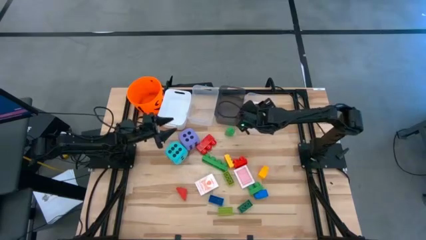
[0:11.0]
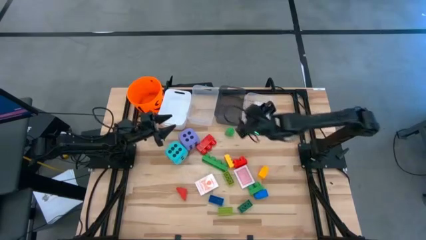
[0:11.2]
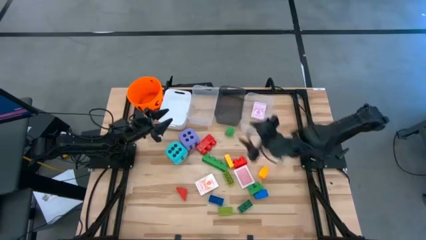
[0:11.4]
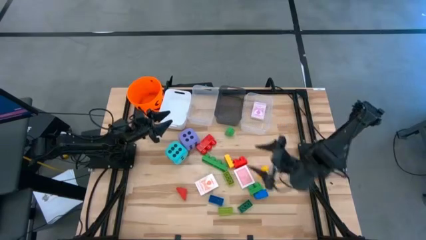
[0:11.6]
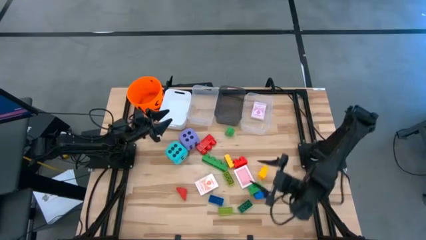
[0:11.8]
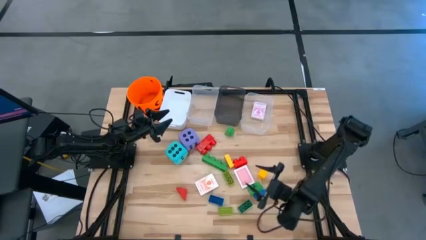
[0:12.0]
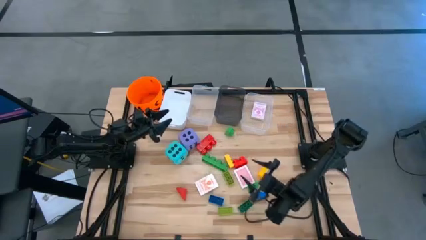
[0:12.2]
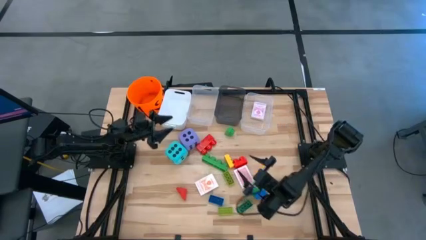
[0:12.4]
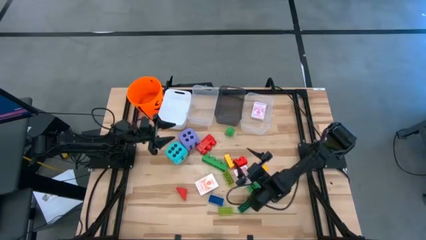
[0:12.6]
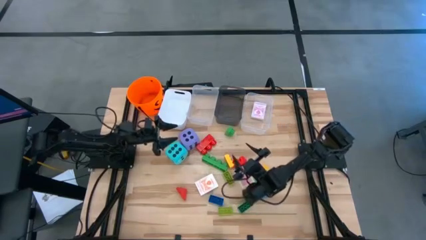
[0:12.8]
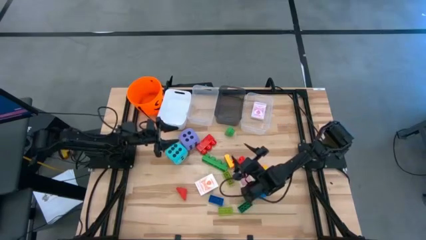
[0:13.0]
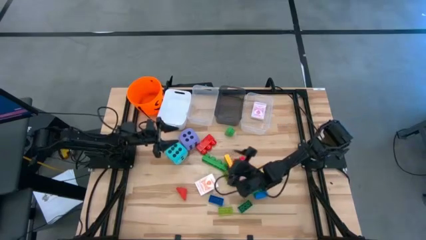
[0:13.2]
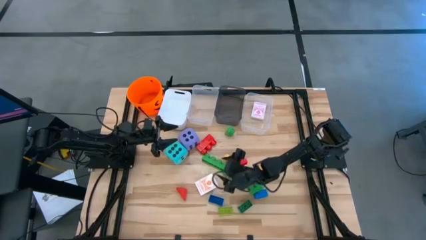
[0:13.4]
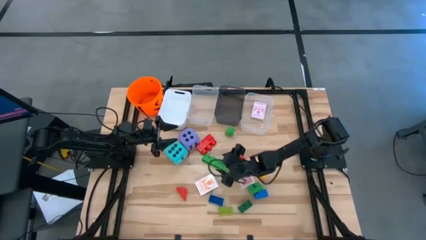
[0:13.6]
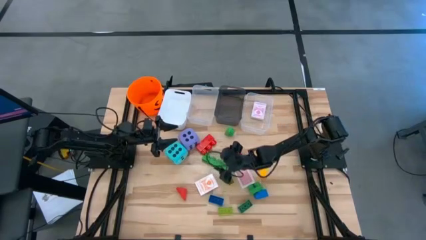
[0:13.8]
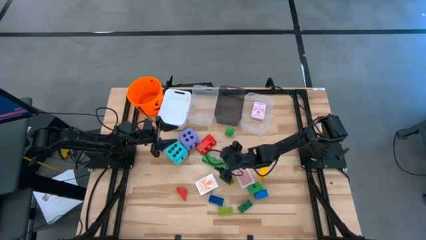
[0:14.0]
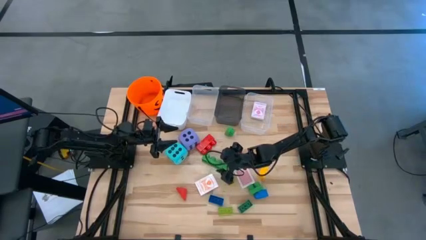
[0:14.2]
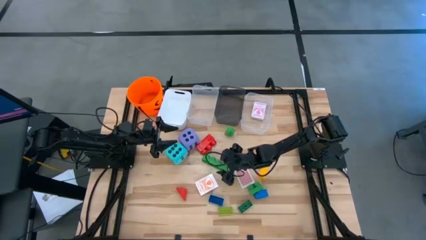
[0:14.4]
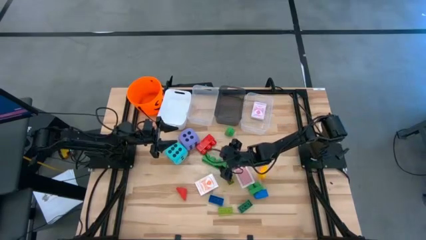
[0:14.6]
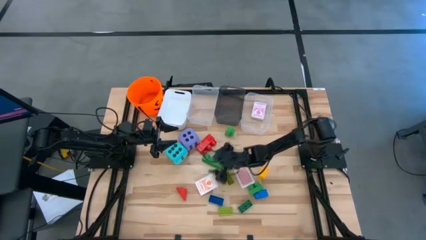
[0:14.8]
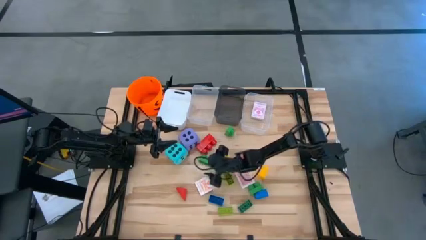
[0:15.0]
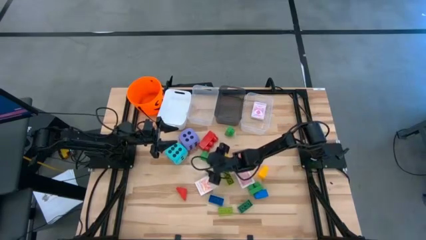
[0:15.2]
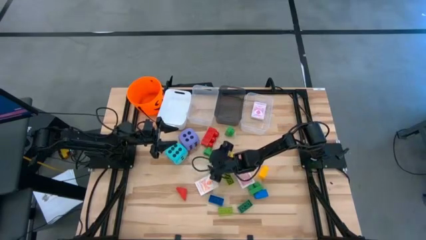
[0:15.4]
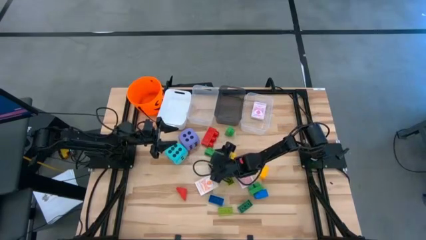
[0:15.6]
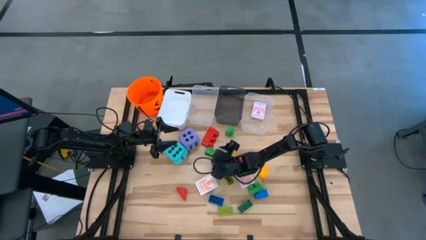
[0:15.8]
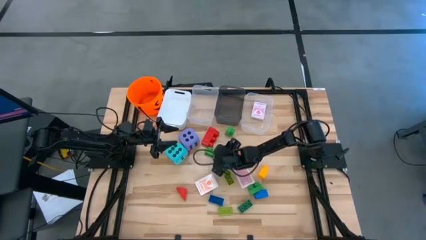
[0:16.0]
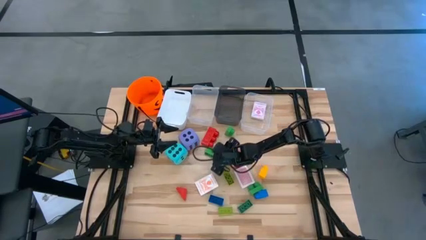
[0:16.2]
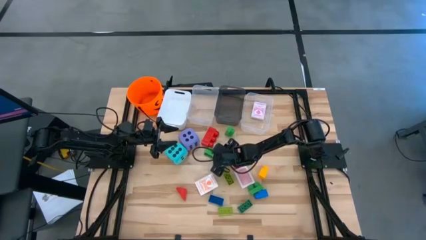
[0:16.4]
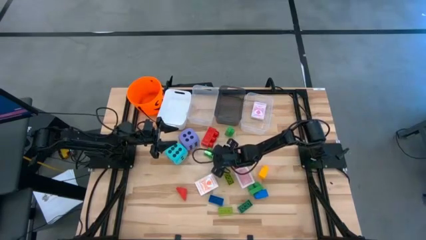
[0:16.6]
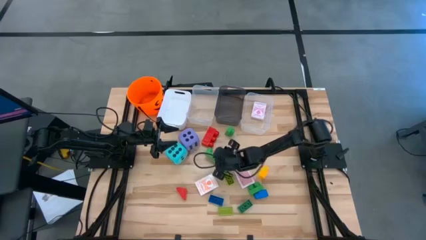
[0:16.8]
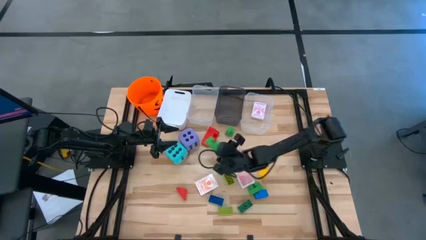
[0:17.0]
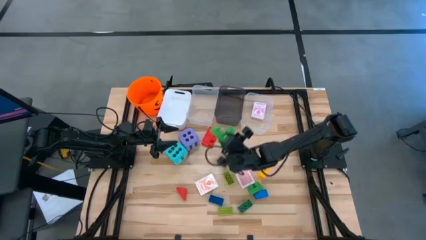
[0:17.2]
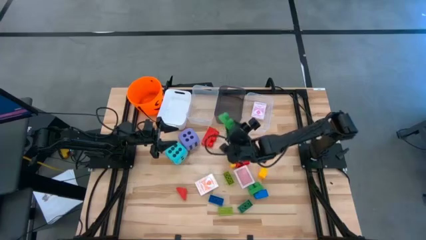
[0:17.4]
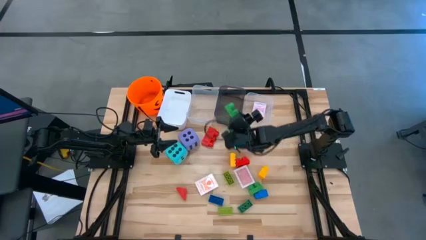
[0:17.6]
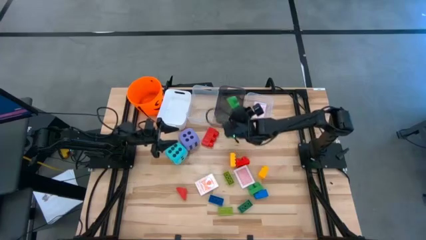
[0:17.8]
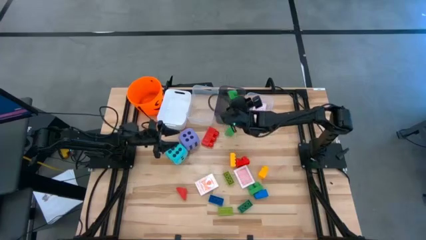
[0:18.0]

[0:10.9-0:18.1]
Task: Pick & Place Toys
Put the large middle green game piece into the black bin

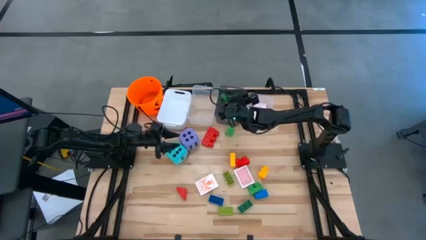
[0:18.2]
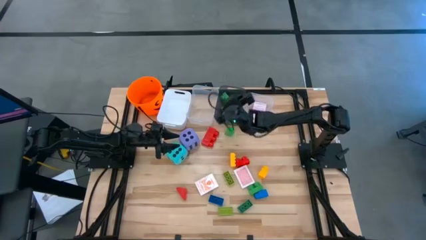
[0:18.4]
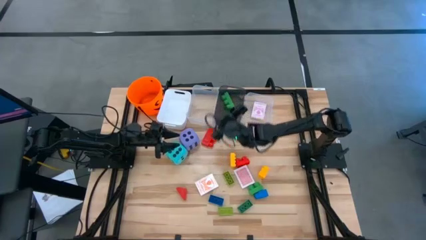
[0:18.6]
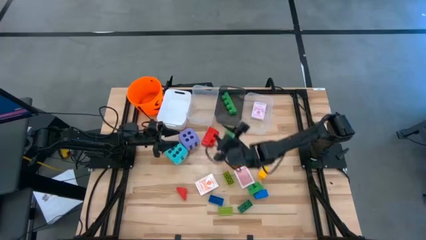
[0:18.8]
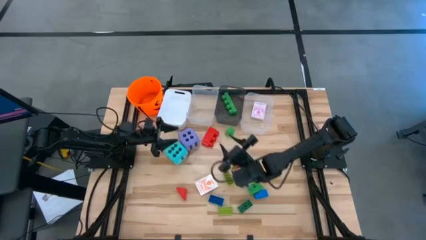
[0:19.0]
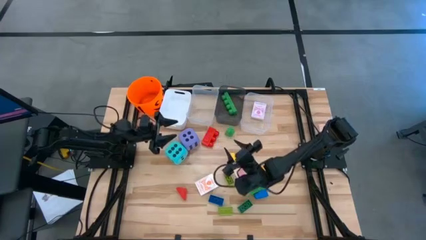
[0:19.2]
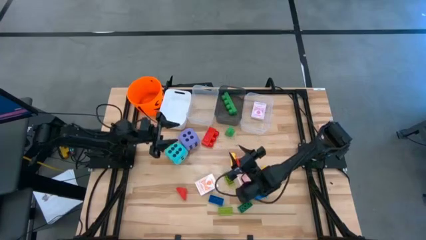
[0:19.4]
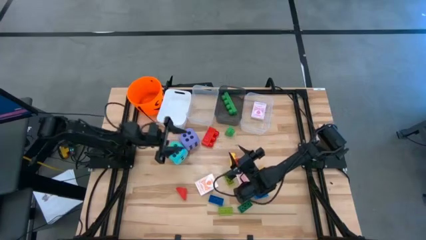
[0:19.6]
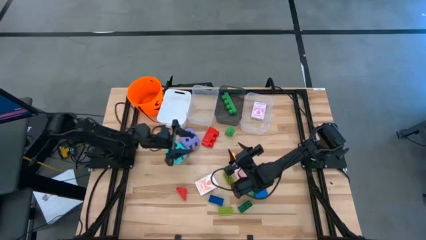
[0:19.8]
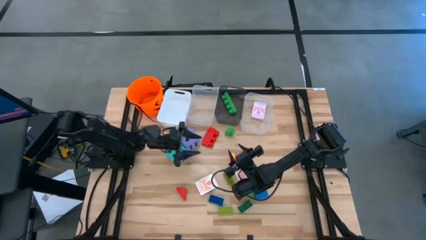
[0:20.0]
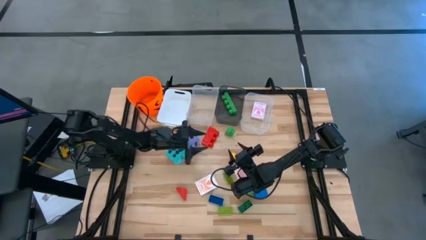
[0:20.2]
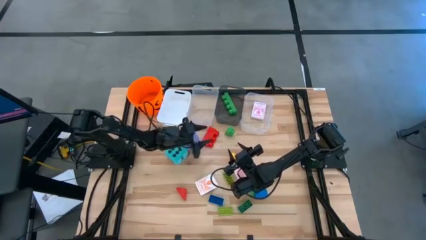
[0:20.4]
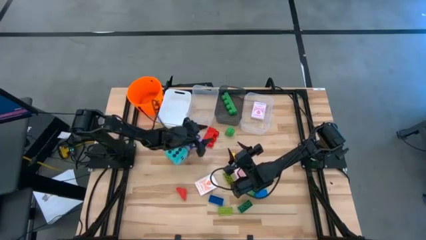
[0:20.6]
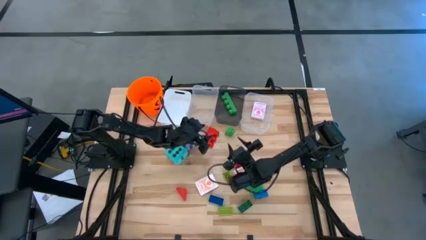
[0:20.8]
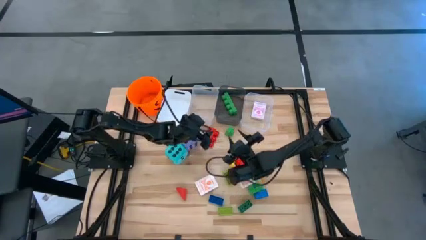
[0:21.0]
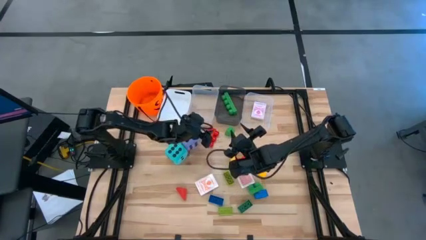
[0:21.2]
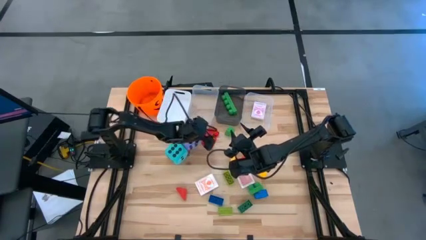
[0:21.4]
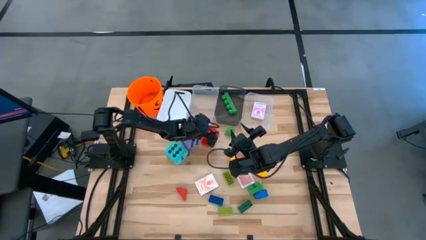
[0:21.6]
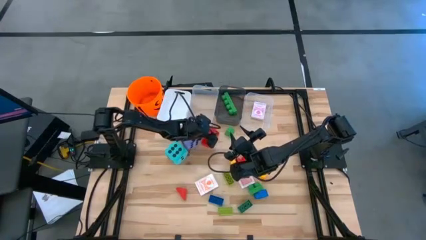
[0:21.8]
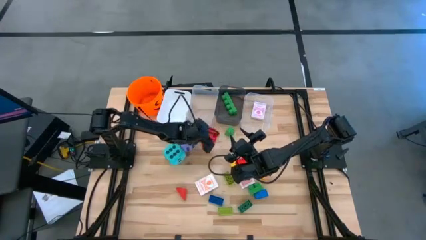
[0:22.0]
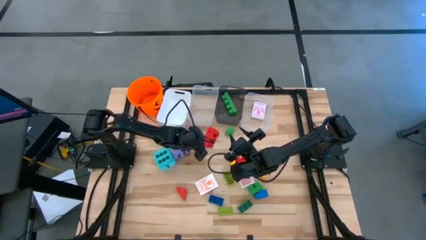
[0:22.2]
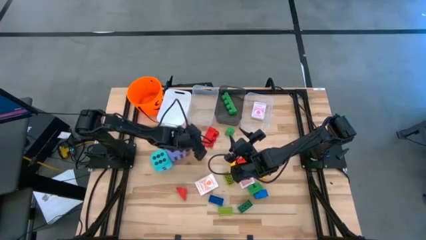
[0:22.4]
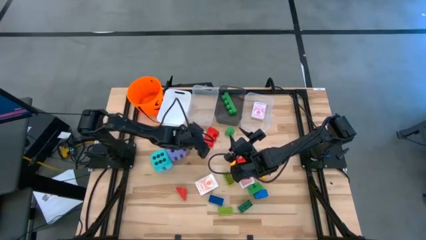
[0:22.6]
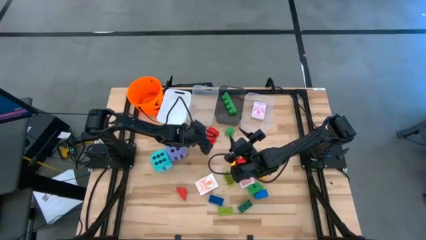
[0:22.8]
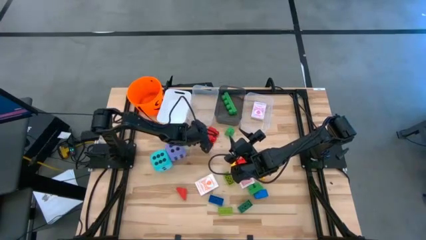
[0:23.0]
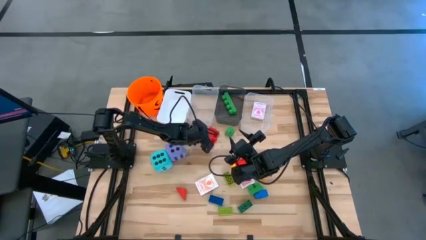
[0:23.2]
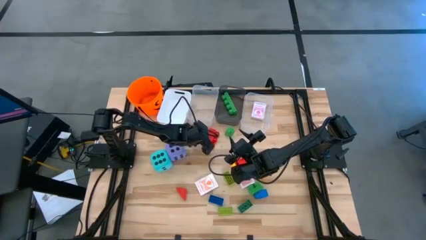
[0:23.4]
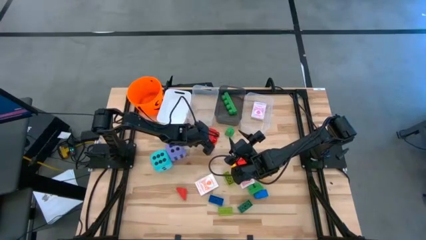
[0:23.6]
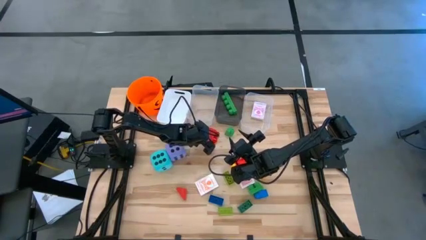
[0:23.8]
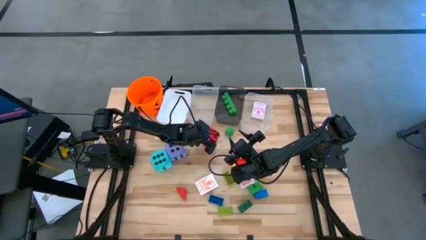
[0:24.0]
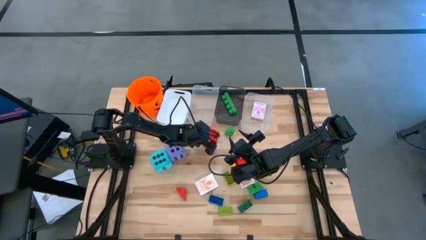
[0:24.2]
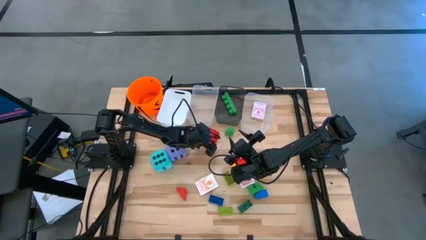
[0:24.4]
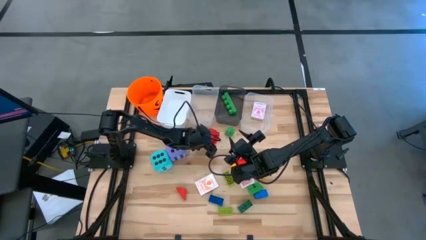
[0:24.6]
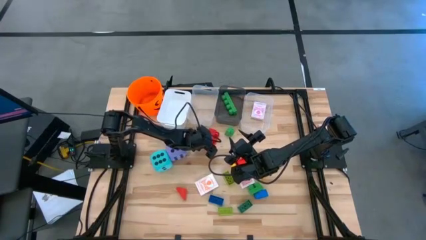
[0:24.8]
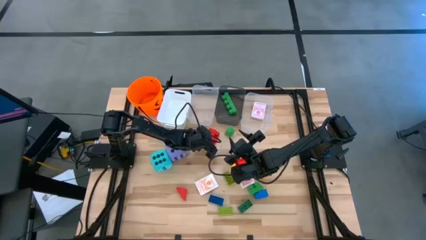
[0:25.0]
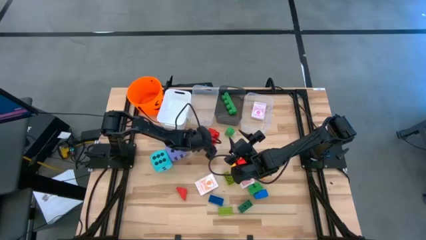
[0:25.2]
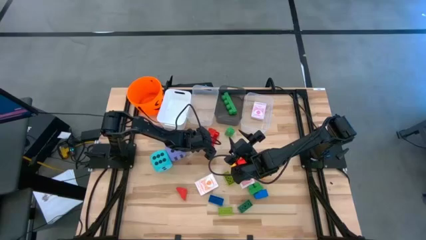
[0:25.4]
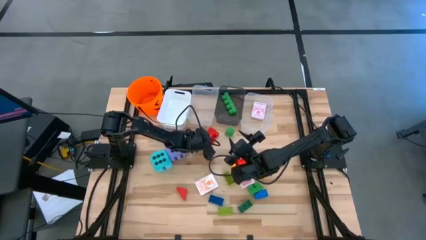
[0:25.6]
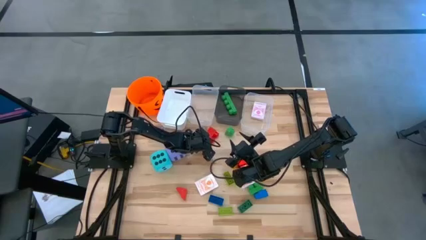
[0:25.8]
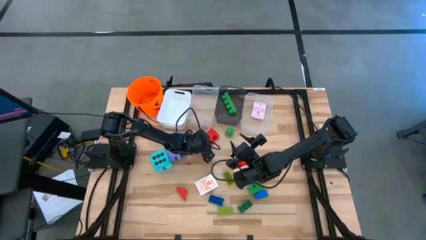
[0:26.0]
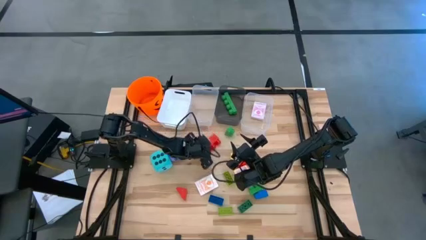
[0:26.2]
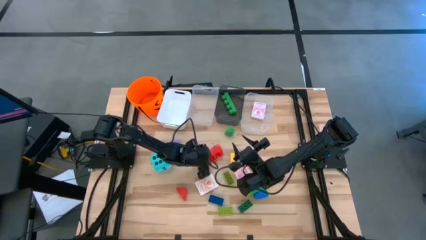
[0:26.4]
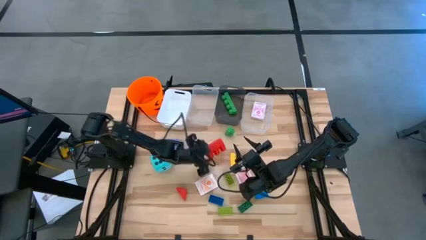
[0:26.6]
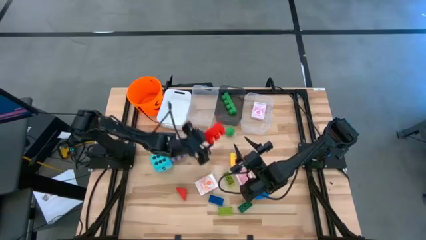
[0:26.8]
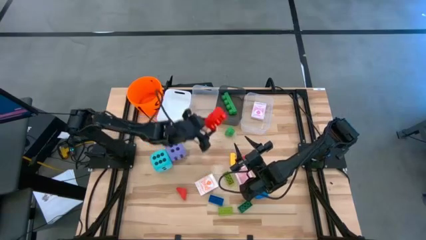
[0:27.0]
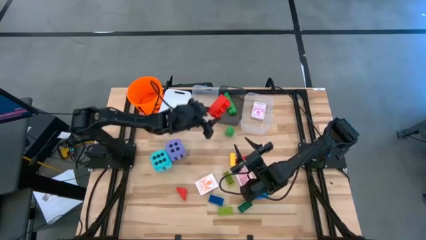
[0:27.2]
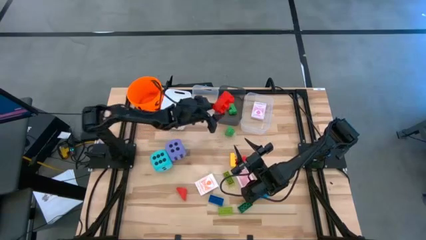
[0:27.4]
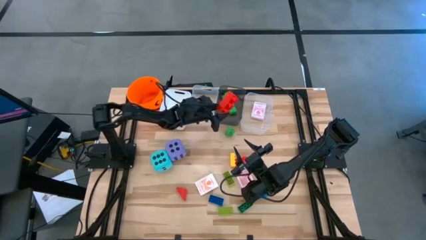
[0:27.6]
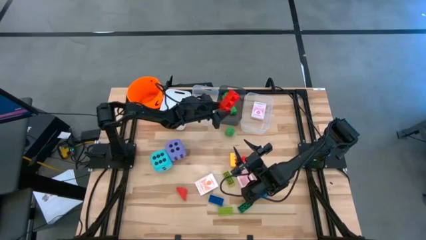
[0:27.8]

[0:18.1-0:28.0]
Put the large red game piece into the black bin
